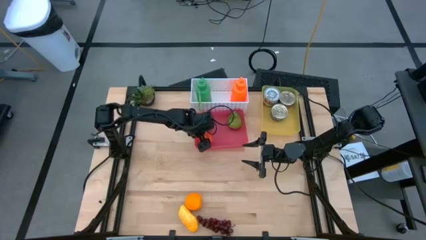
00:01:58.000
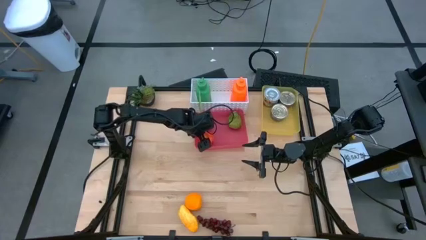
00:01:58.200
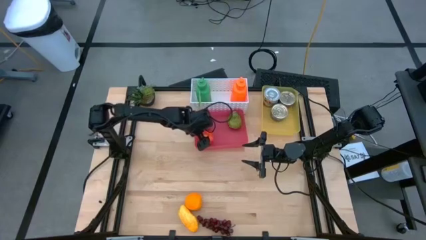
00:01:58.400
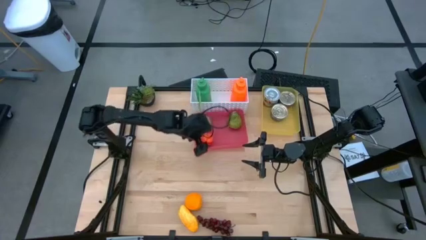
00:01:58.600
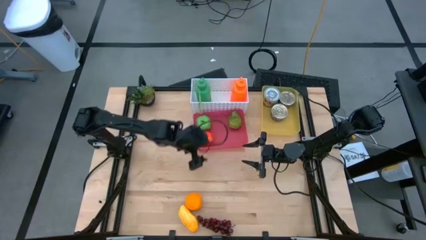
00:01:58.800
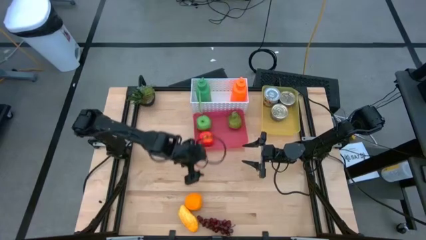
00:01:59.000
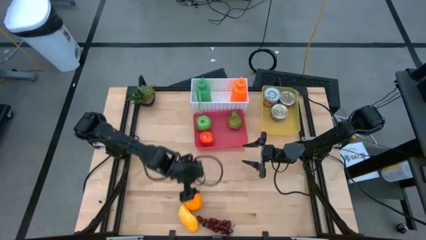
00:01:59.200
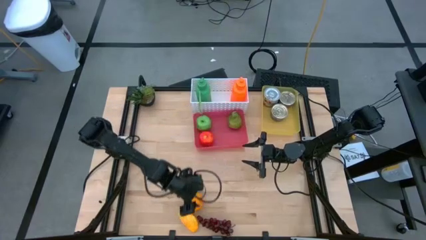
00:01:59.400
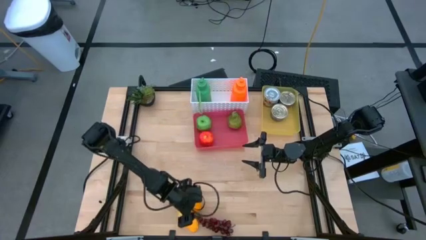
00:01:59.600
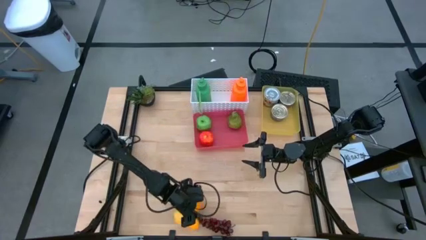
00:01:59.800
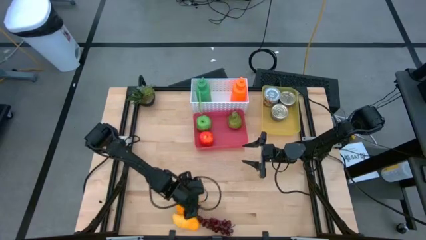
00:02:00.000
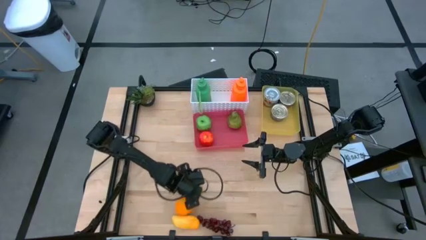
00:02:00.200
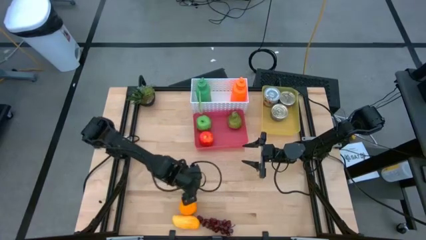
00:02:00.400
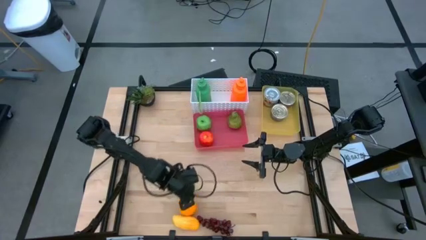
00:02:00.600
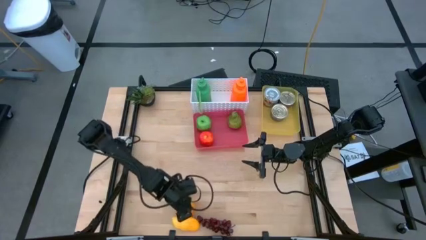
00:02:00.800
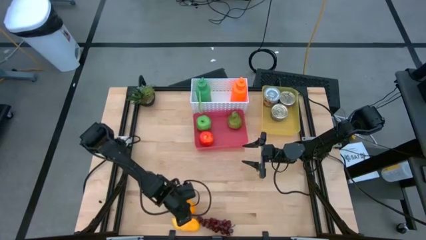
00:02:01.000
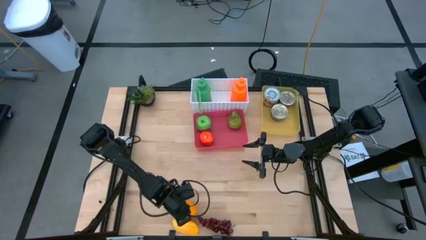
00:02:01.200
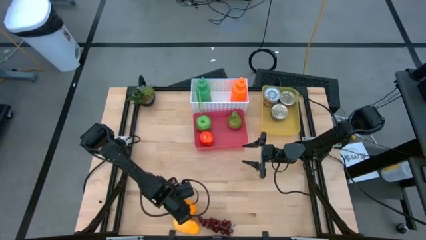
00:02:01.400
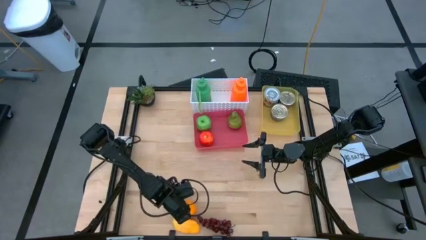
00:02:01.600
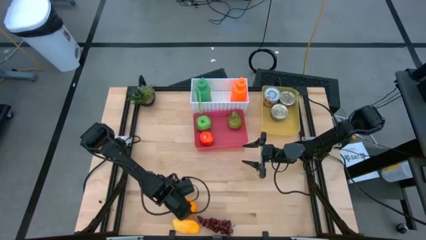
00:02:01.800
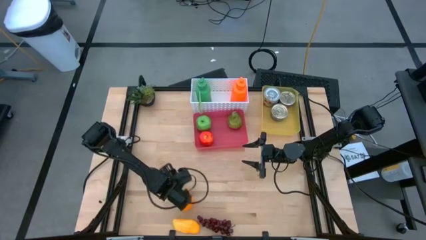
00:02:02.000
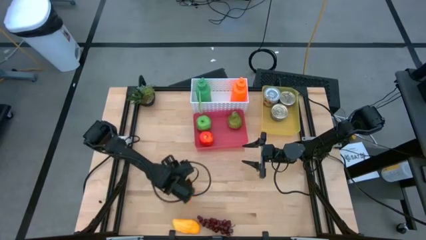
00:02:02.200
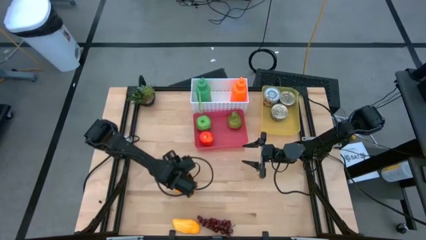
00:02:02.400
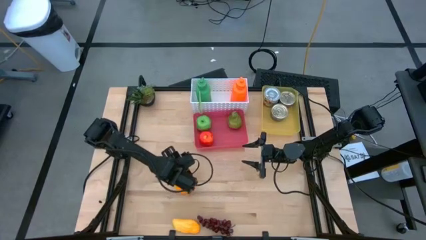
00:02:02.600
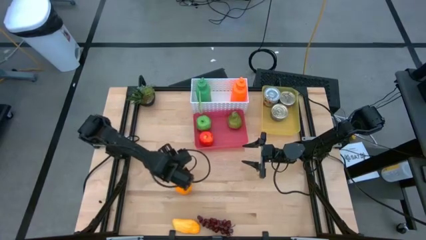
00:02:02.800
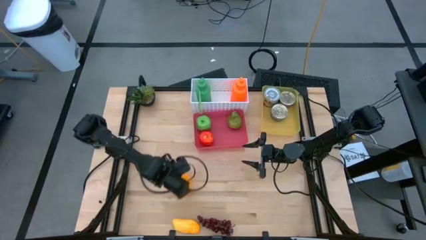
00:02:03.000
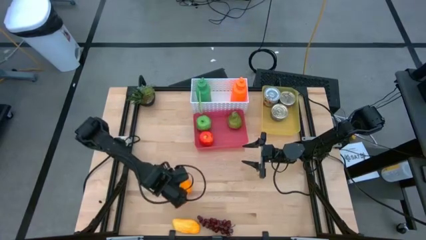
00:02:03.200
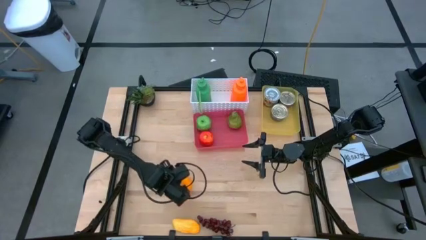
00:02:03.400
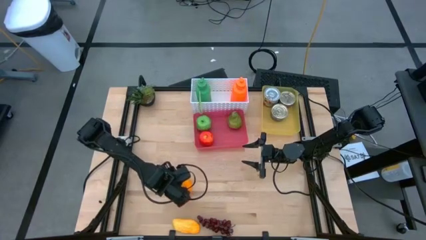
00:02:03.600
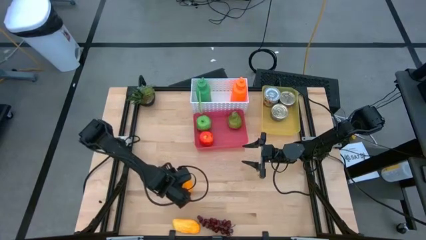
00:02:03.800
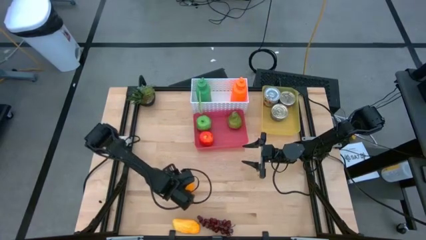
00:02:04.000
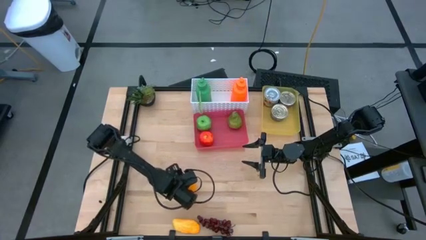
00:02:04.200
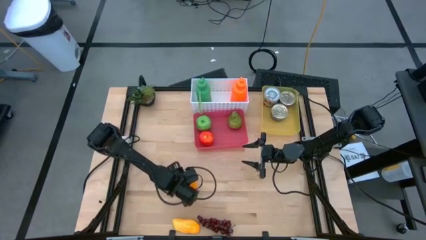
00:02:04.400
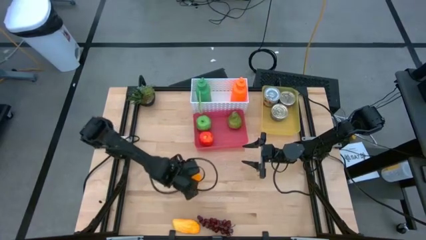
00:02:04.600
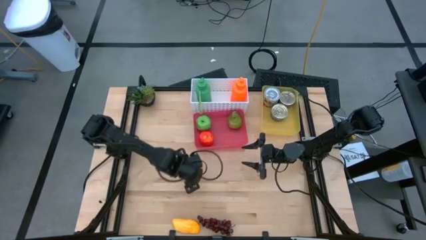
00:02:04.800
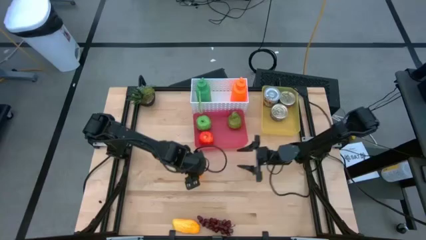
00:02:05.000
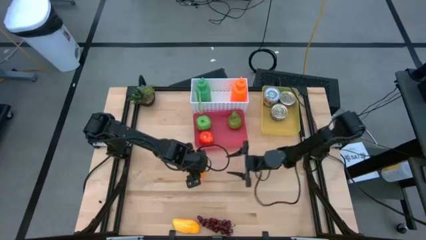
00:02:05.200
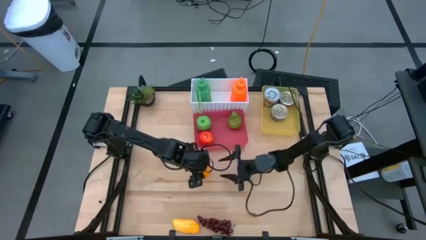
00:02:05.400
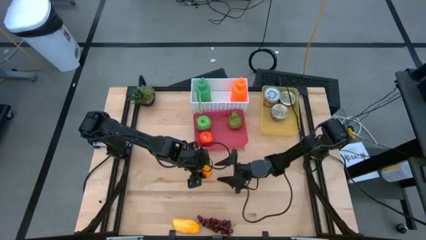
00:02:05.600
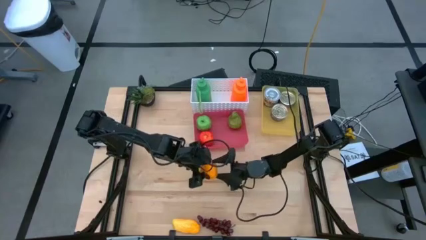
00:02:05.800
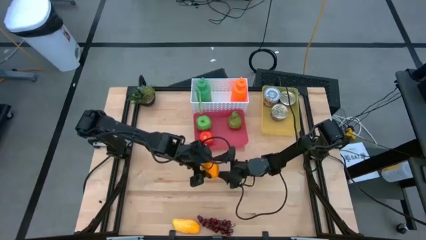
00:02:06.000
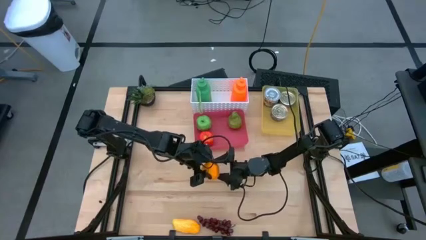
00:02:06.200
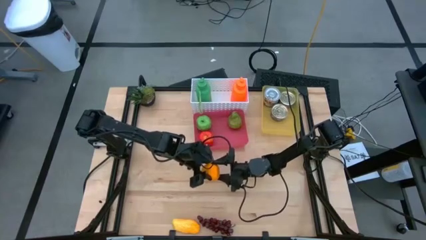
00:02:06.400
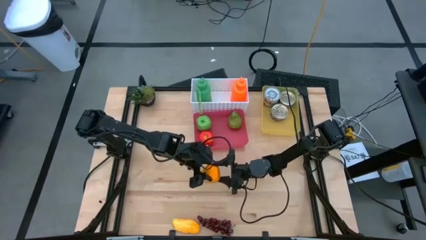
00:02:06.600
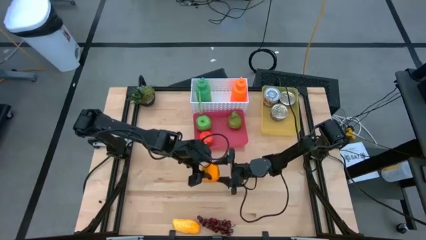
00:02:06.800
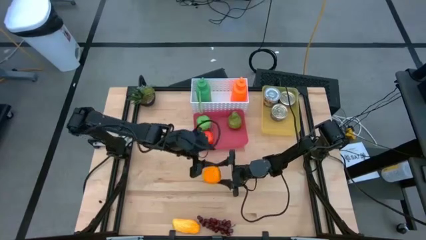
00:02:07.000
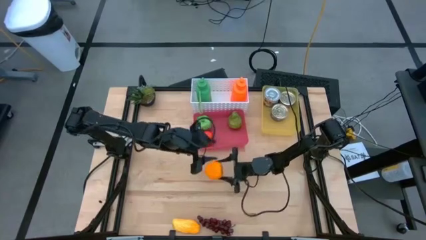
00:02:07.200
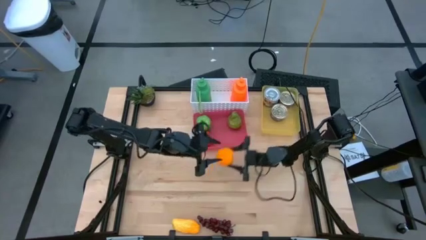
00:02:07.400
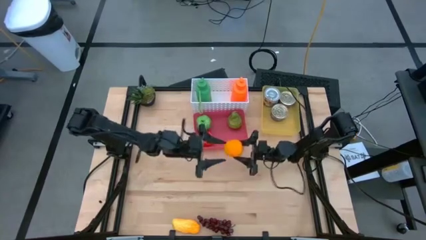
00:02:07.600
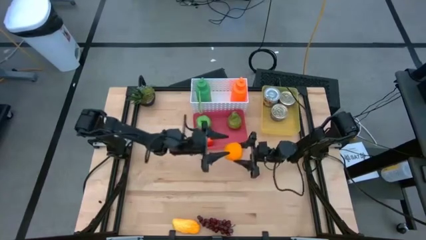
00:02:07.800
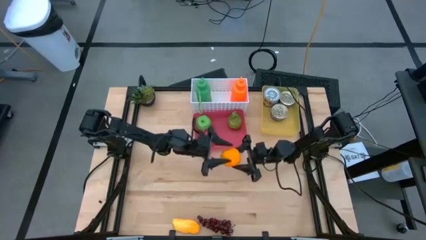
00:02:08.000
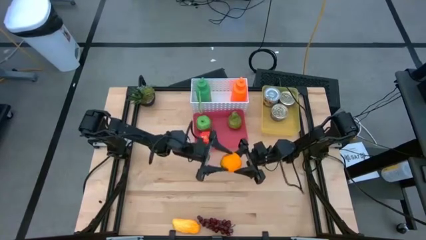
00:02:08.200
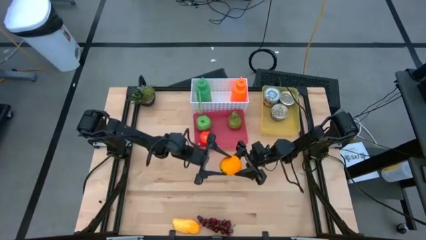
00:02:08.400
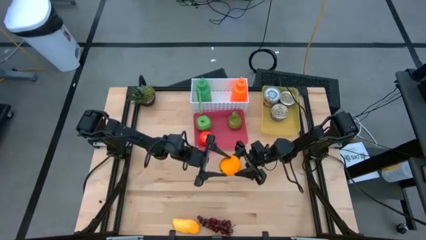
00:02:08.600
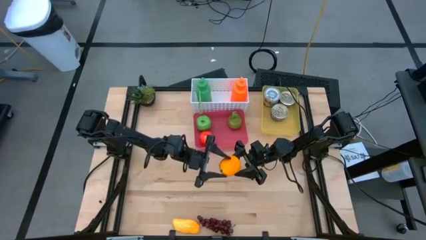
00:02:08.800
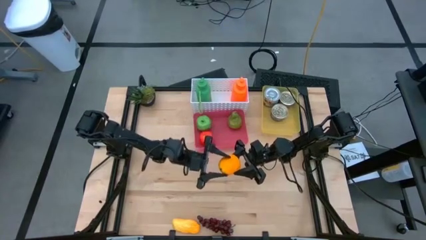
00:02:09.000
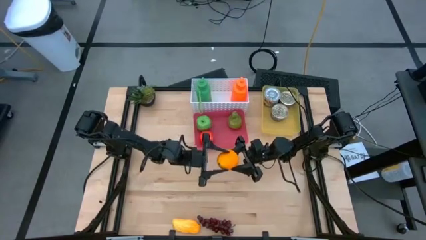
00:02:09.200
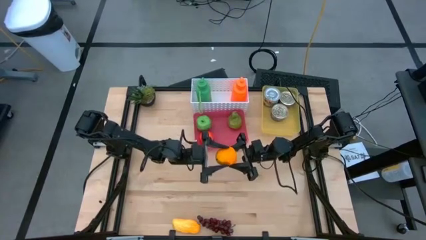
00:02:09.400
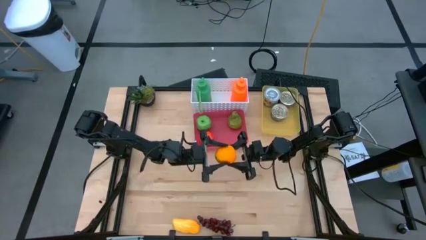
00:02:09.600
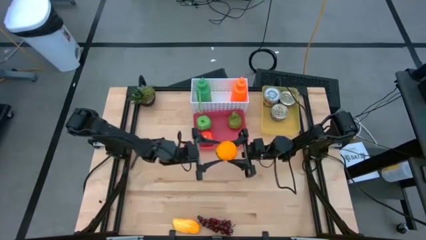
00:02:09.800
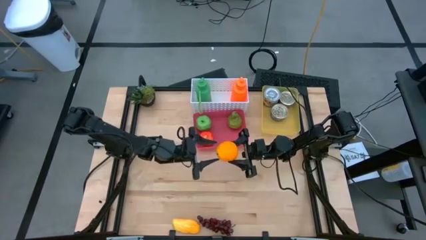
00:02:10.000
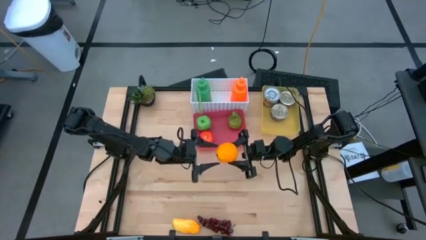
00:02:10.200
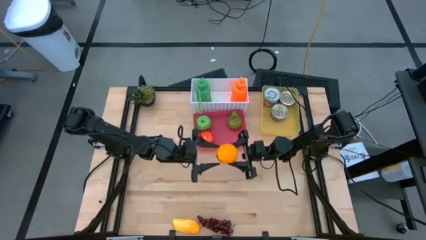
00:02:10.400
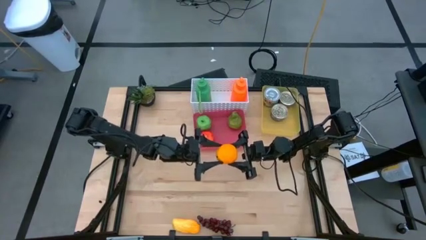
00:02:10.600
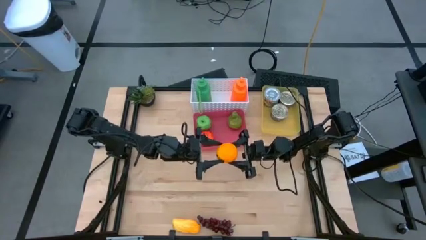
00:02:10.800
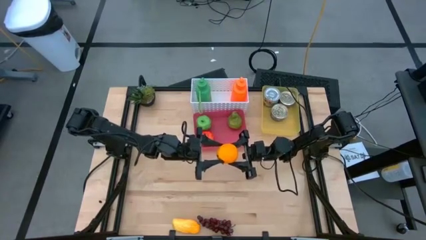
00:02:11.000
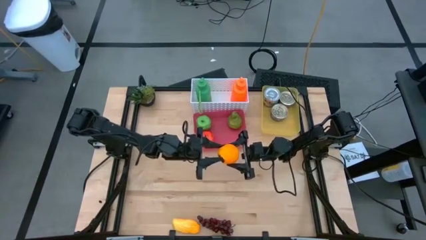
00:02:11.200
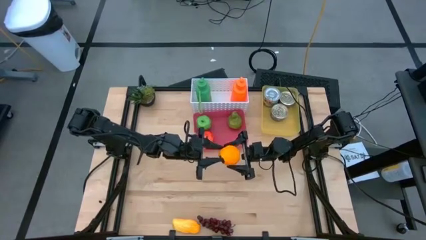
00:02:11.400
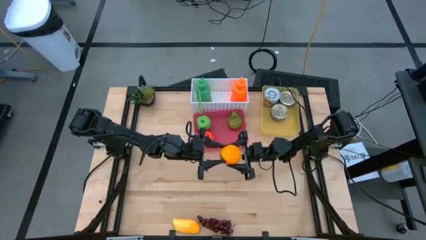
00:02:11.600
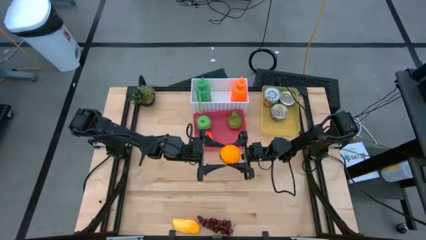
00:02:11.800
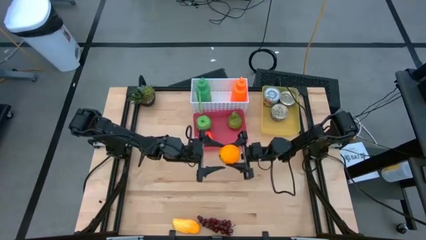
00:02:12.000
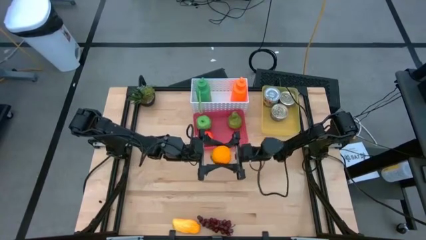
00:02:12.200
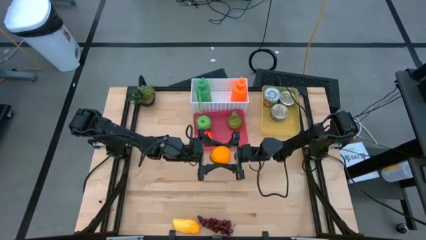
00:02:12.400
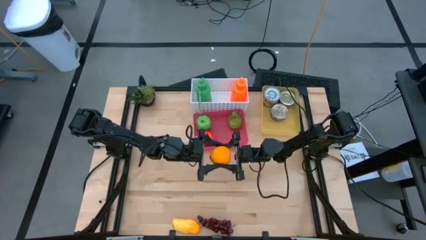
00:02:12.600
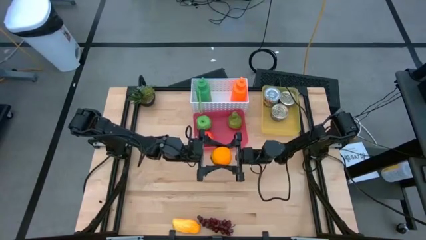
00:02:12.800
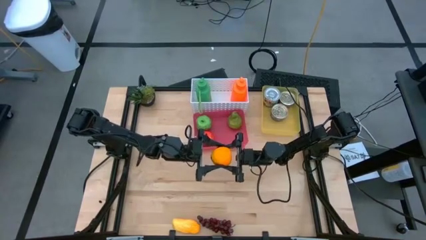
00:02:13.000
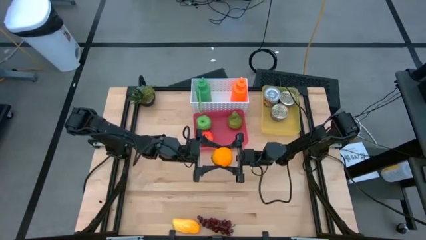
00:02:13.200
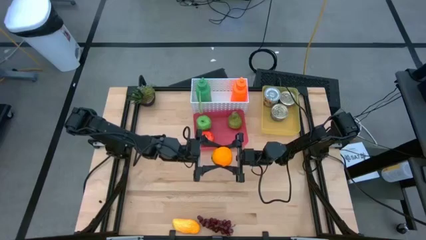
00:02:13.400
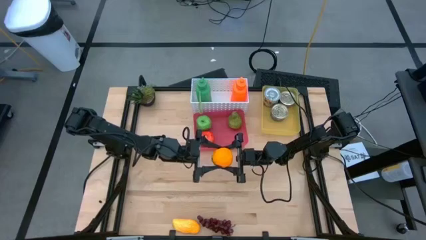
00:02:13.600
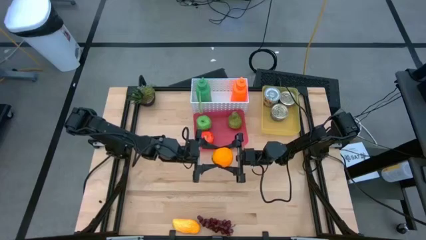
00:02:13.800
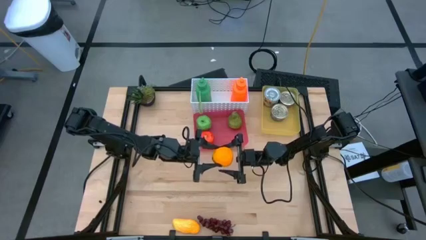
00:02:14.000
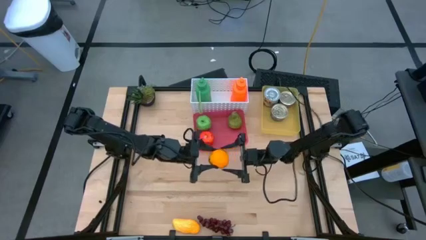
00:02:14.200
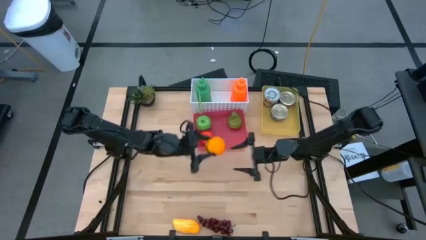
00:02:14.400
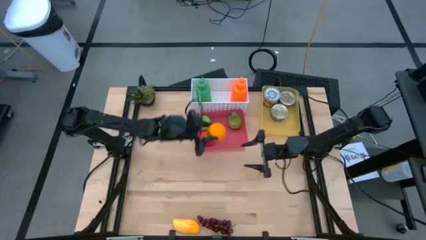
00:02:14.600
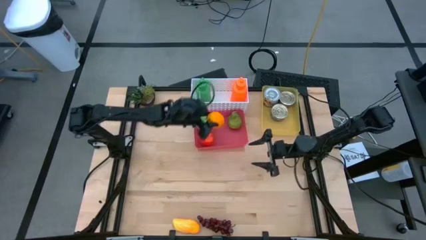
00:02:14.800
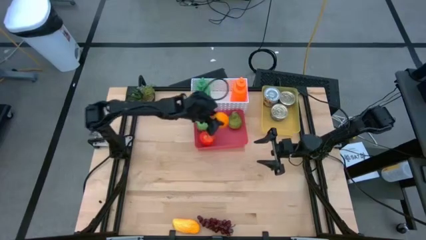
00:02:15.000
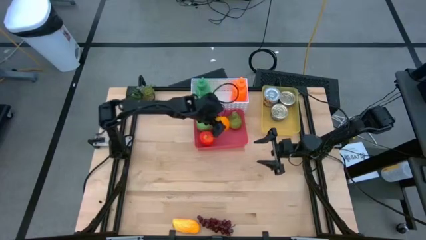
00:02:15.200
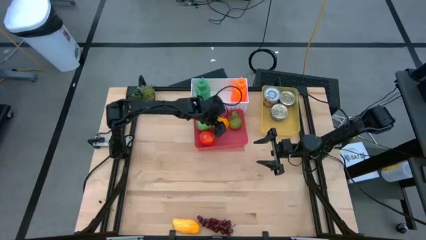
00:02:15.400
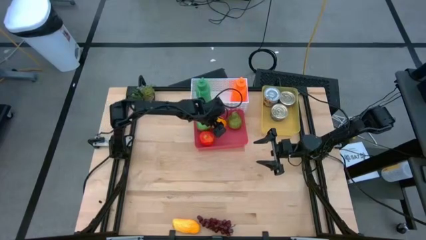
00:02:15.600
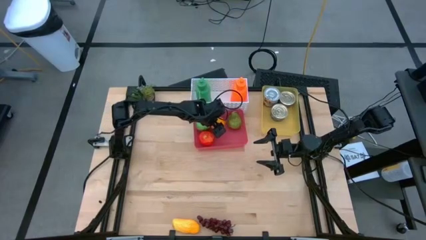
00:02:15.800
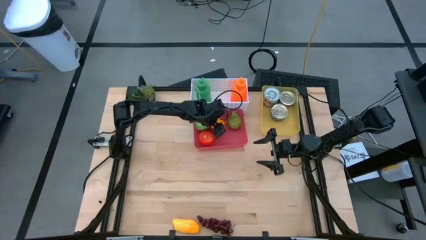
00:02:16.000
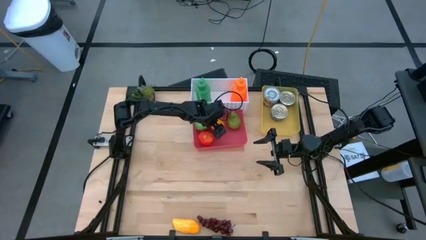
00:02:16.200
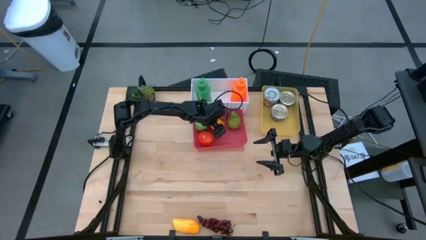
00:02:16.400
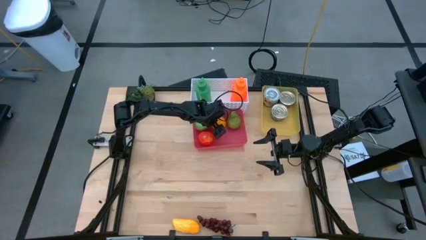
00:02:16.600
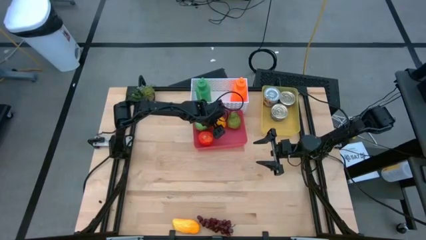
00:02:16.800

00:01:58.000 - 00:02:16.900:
Task: Pick & Place Food Item
Put the orange into the red bin
